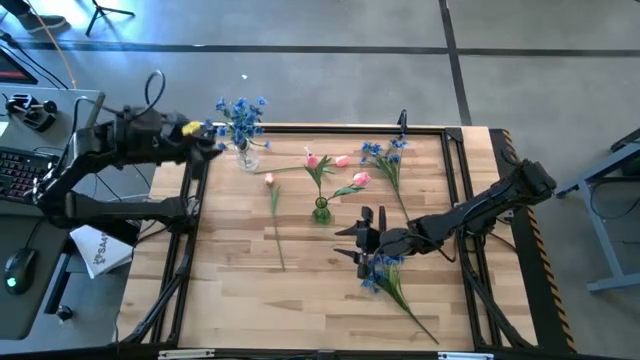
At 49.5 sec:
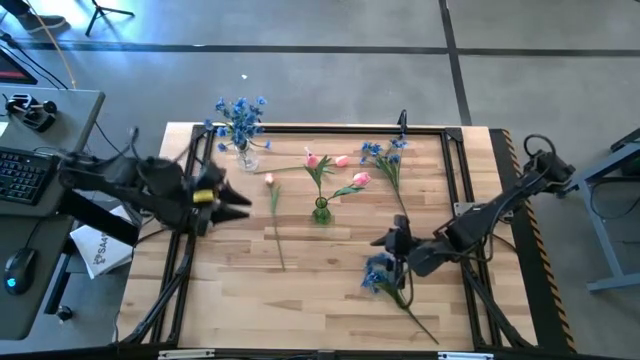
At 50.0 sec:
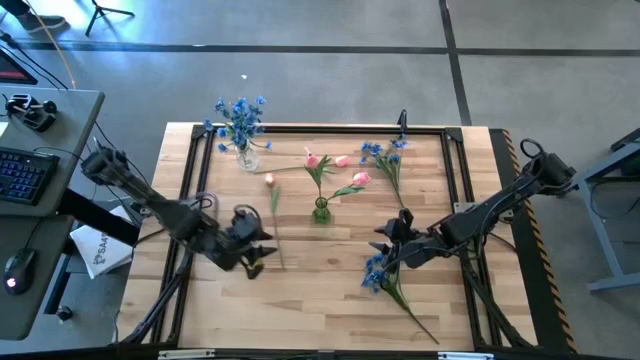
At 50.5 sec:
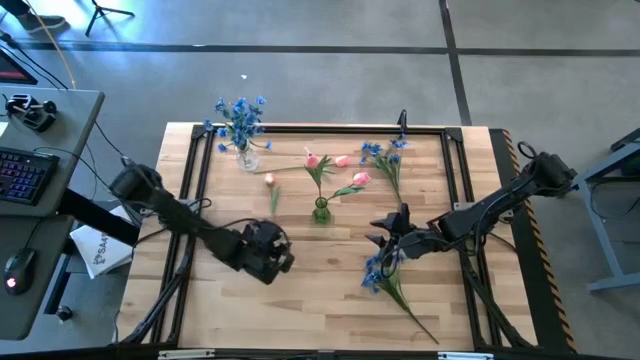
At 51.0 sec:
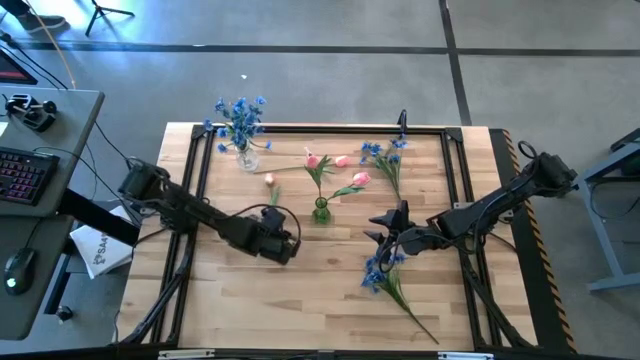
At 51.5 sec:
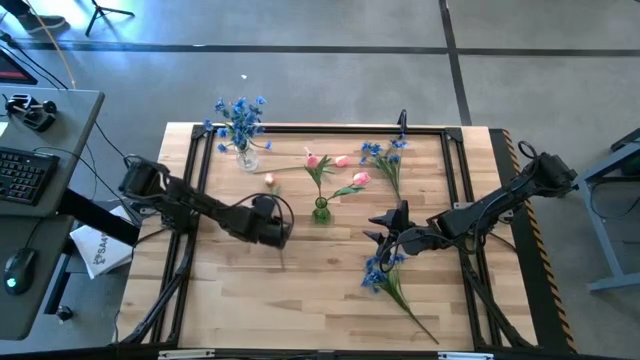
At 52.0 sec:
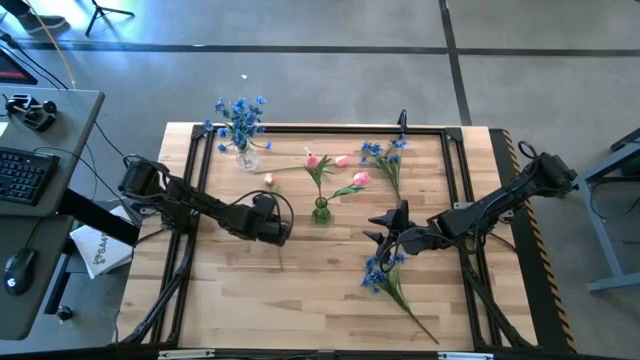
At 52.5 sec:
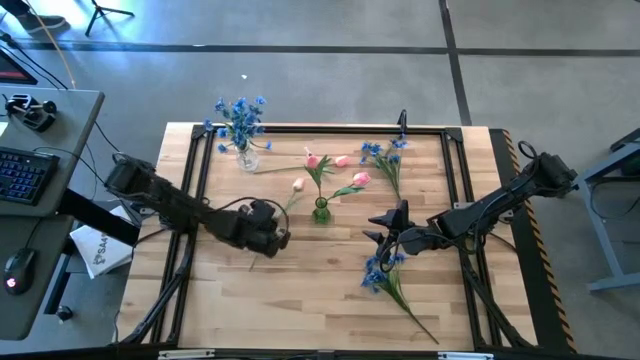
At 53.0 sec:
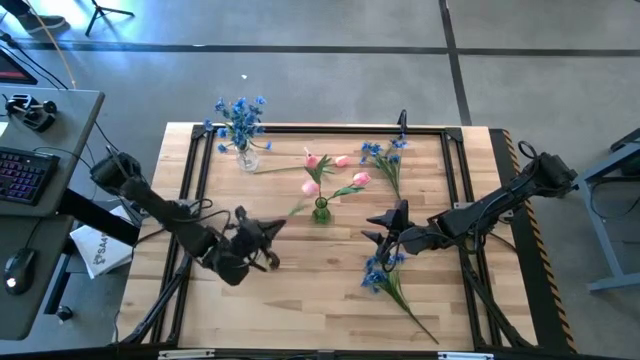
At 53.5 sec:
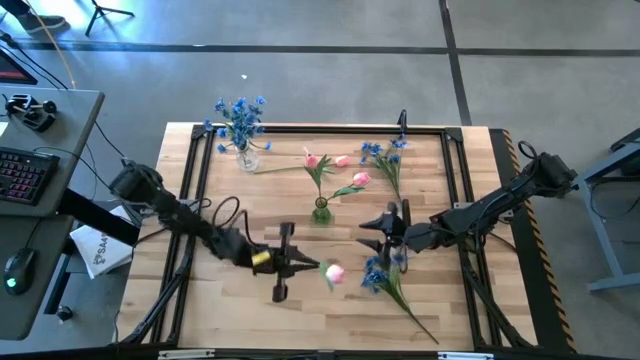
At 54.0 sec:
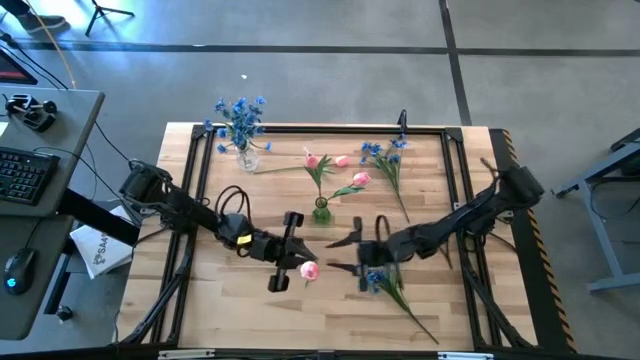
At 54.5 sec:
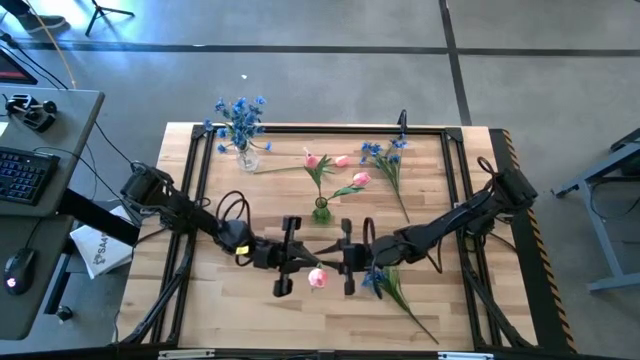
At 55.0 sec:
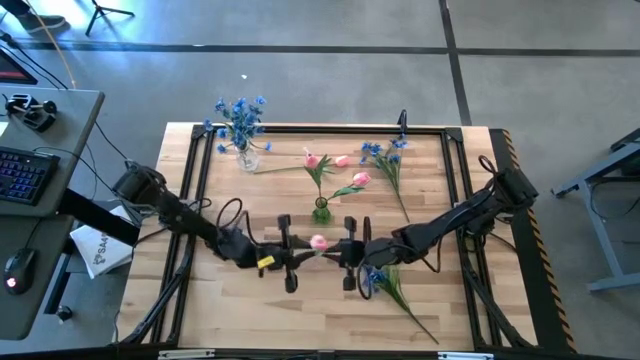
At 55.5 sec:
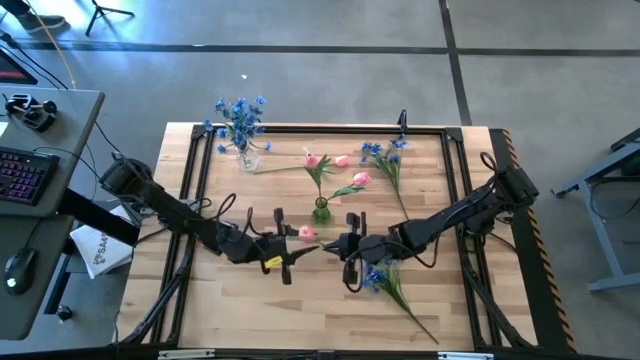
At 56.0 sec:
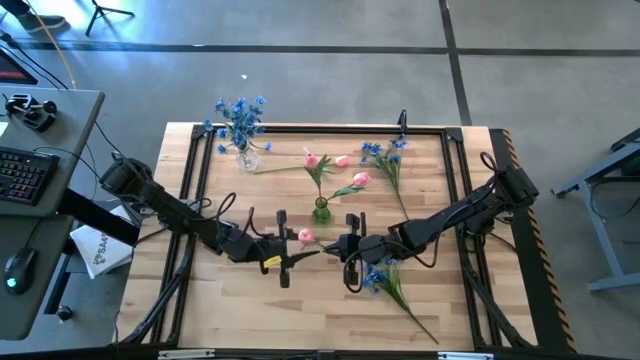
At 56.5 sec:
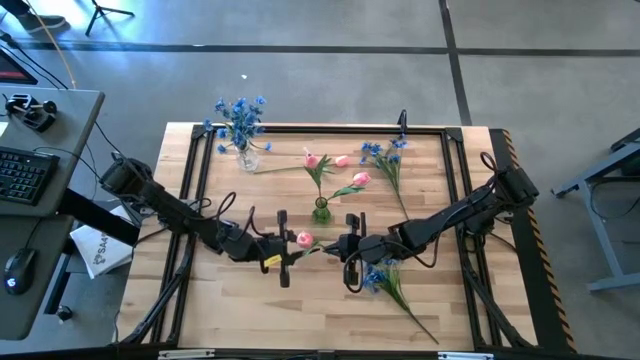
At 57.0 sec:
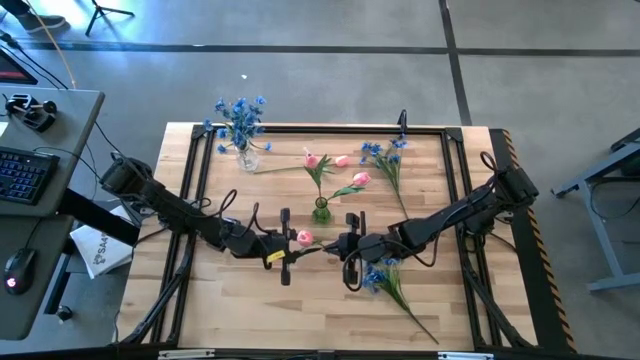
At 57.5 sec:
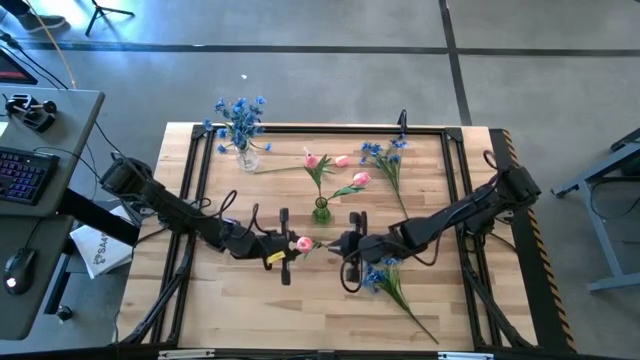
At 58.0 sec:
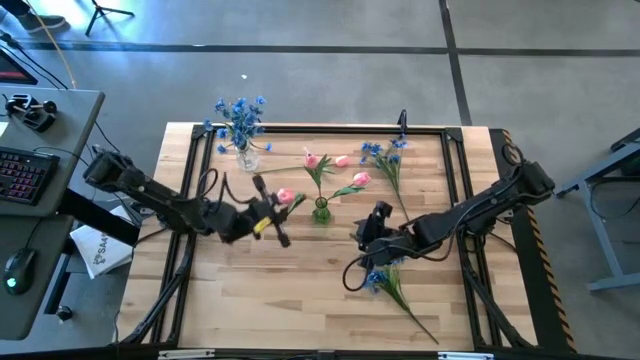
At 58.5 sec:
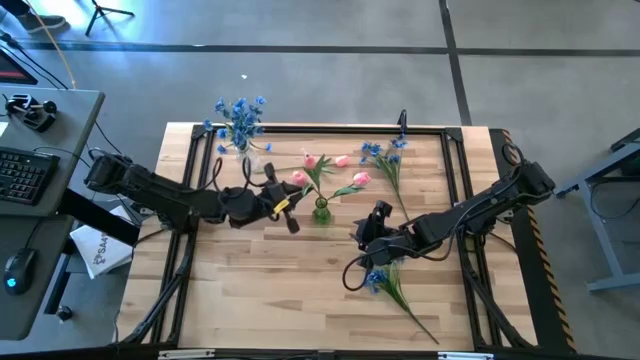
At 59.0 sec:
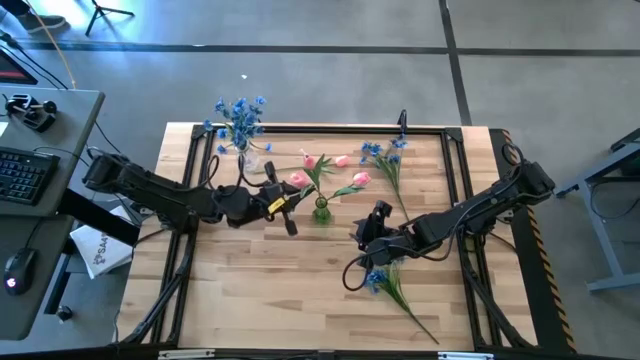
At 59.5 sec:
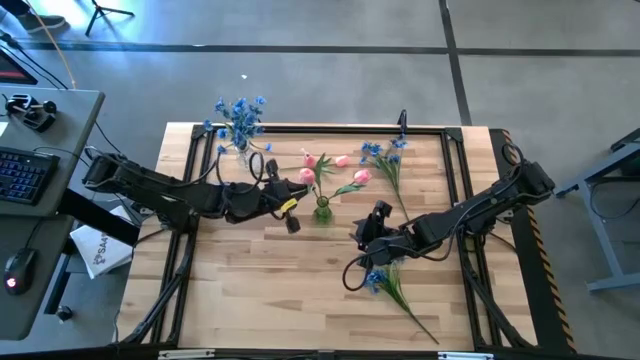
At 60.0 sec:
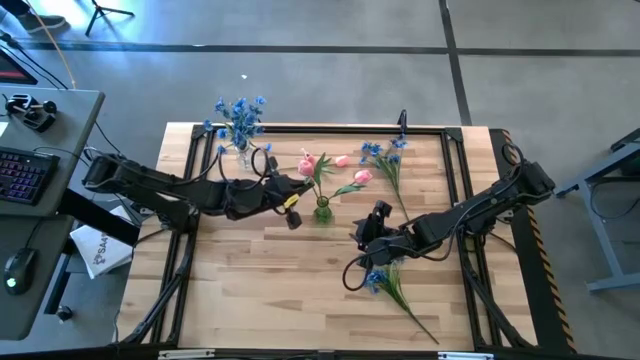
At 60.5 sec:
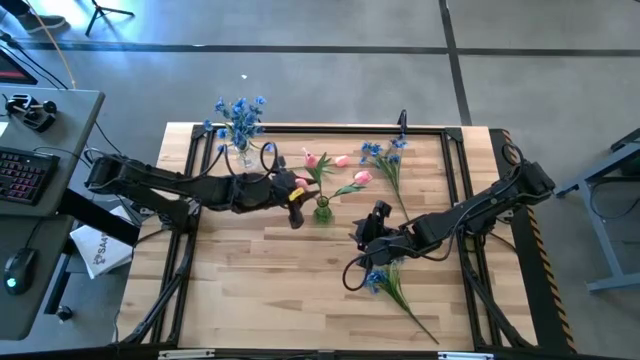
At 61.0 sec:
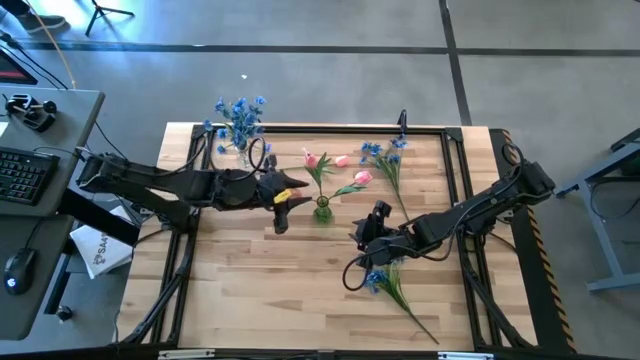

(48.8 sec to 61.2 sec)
Task: Sort flowers into vase by color
Put the pink tulip into the green vase
